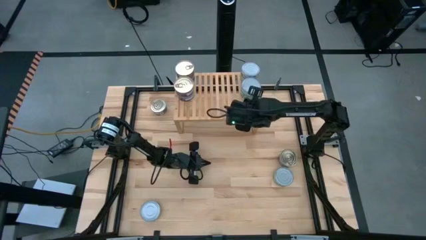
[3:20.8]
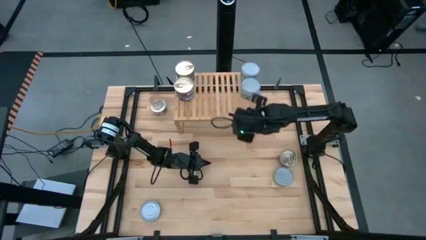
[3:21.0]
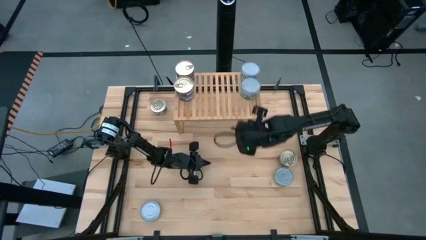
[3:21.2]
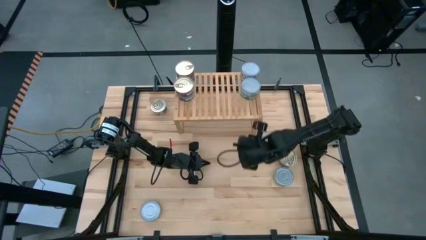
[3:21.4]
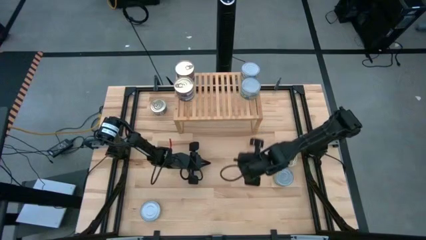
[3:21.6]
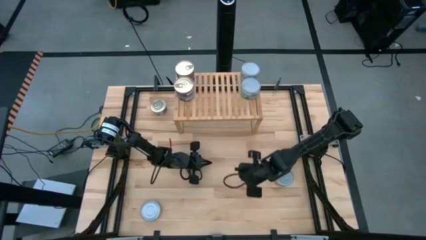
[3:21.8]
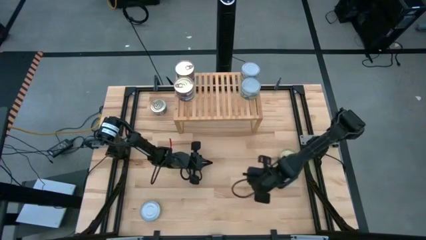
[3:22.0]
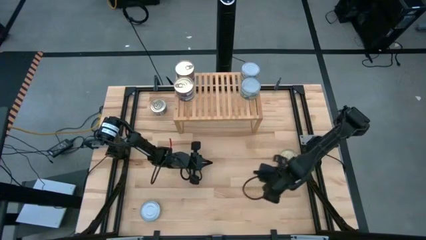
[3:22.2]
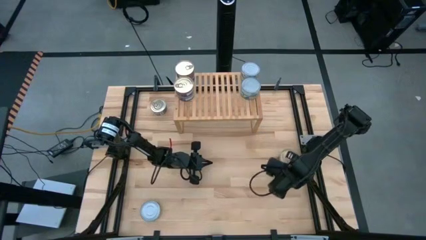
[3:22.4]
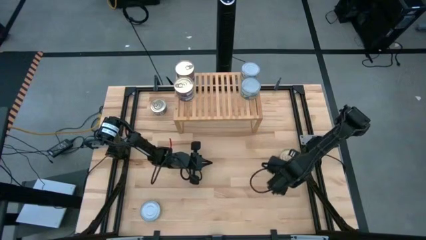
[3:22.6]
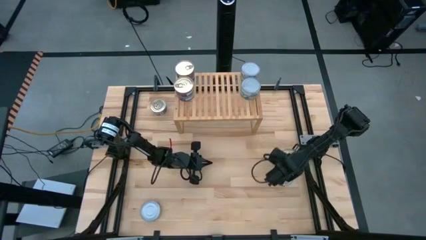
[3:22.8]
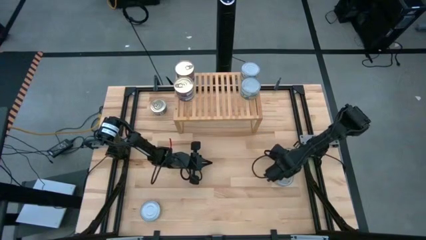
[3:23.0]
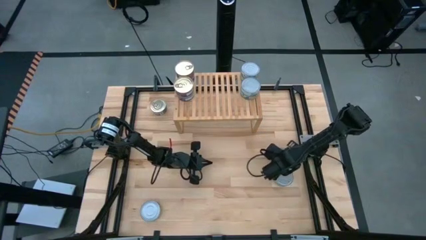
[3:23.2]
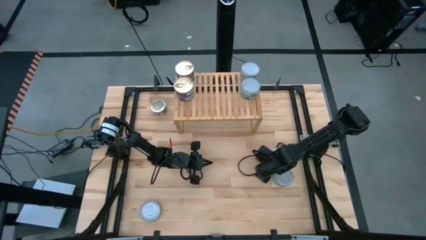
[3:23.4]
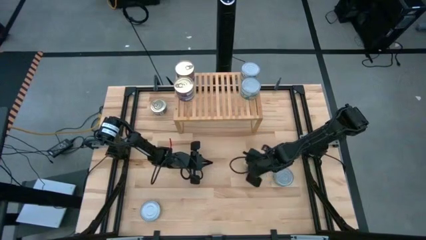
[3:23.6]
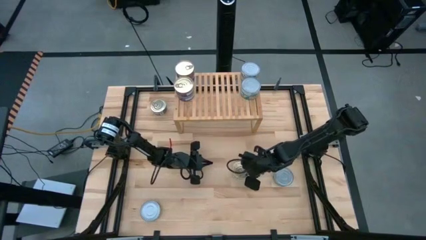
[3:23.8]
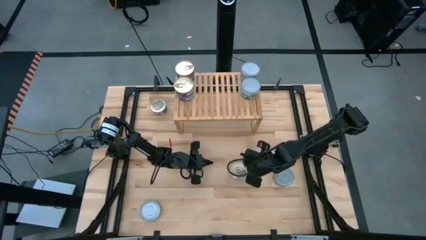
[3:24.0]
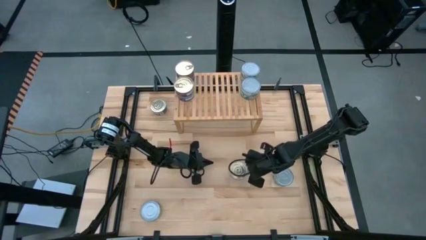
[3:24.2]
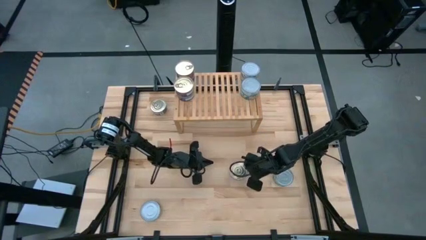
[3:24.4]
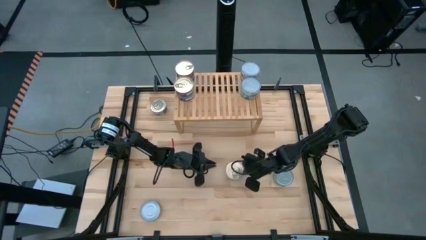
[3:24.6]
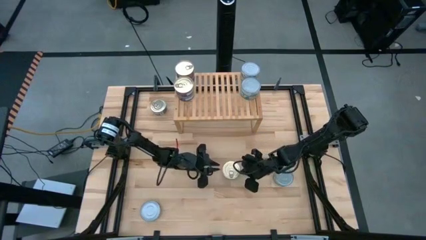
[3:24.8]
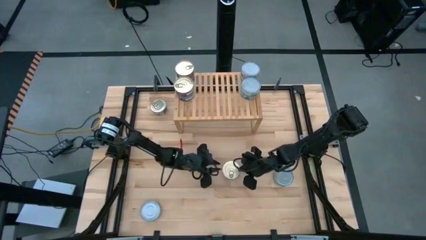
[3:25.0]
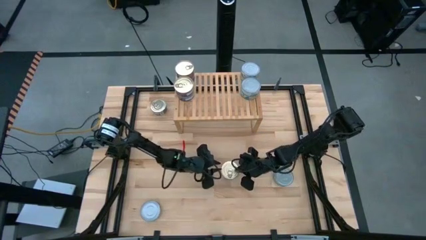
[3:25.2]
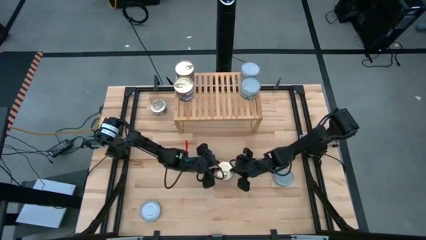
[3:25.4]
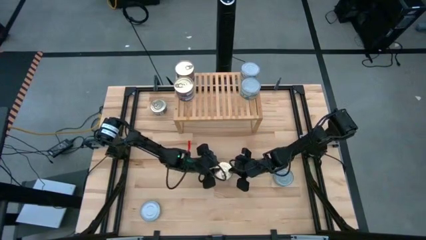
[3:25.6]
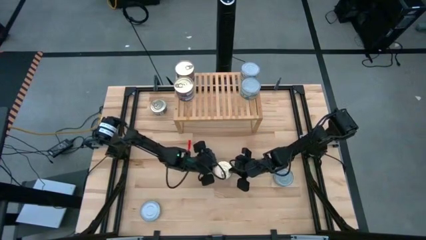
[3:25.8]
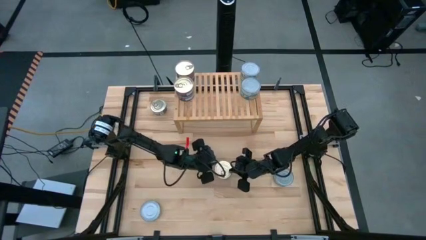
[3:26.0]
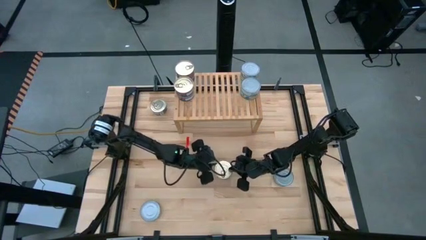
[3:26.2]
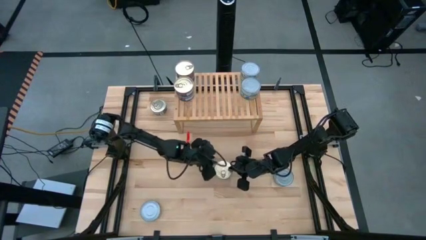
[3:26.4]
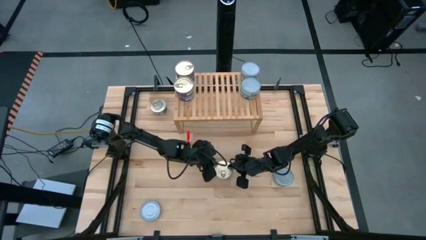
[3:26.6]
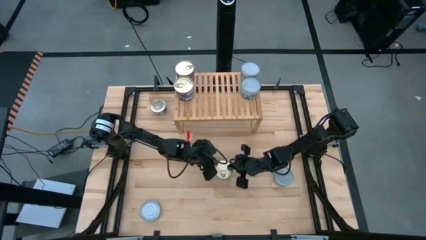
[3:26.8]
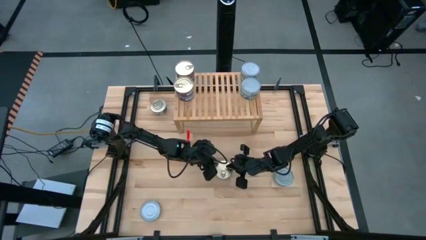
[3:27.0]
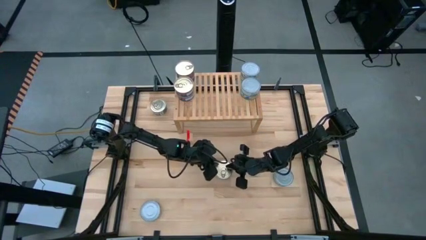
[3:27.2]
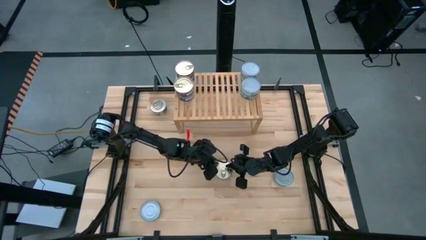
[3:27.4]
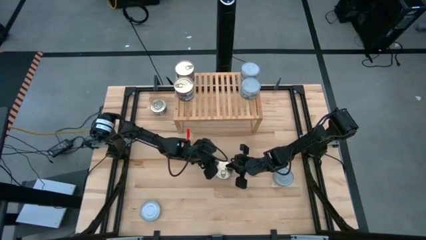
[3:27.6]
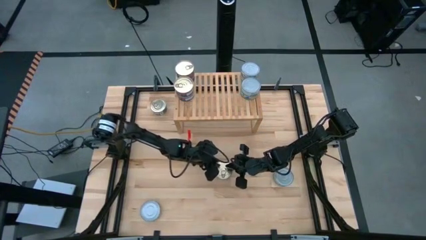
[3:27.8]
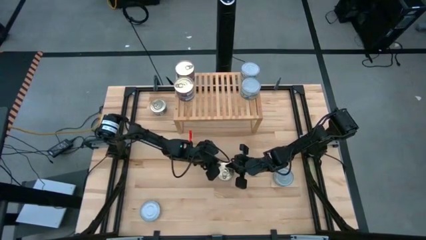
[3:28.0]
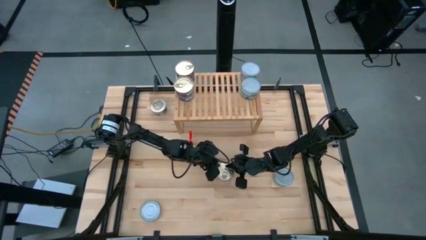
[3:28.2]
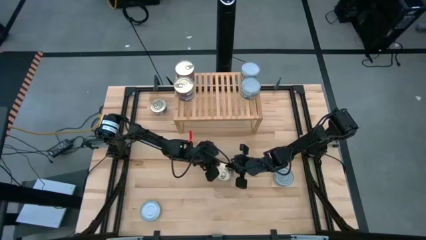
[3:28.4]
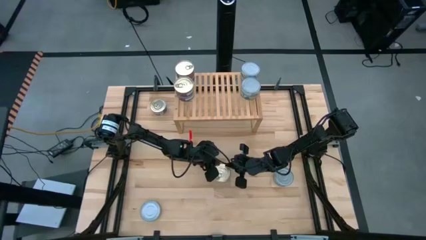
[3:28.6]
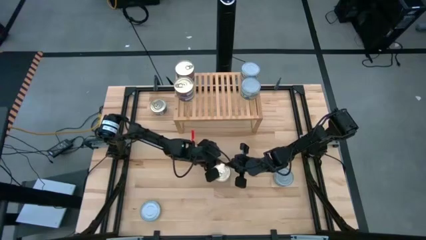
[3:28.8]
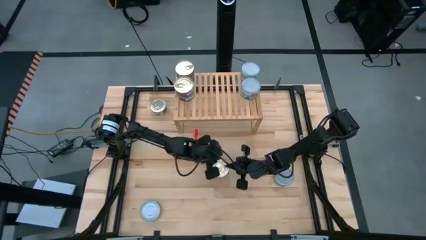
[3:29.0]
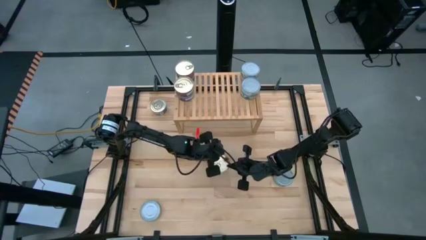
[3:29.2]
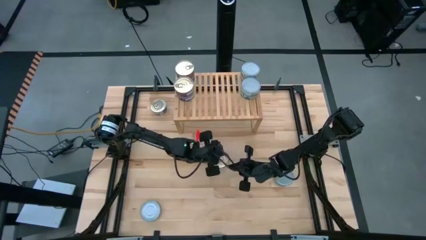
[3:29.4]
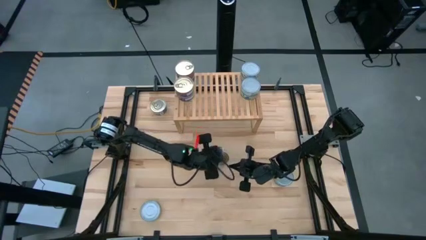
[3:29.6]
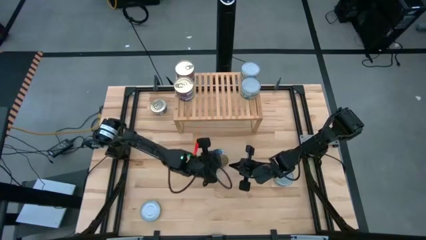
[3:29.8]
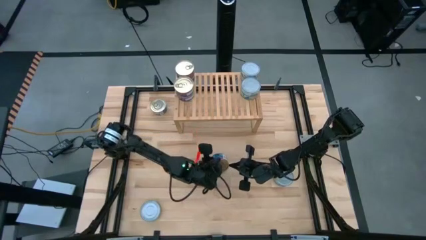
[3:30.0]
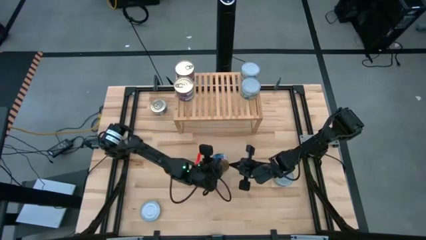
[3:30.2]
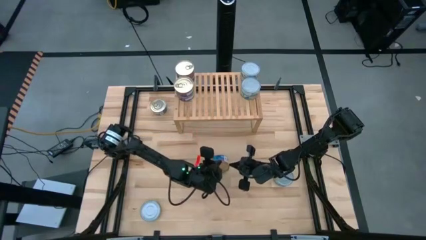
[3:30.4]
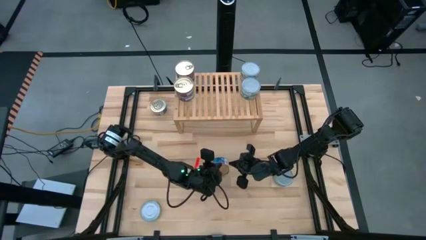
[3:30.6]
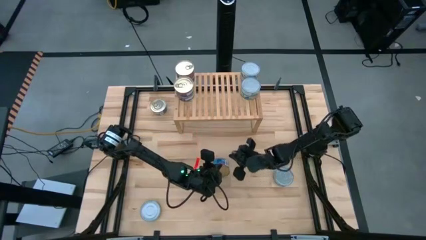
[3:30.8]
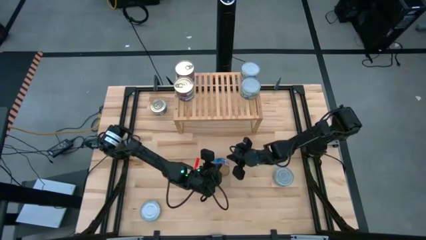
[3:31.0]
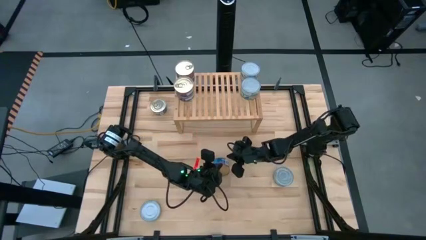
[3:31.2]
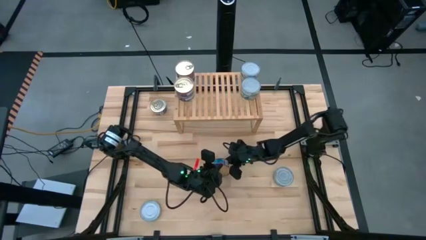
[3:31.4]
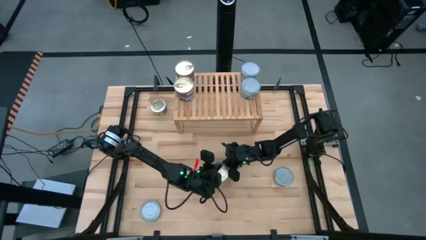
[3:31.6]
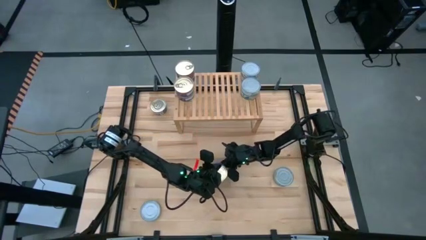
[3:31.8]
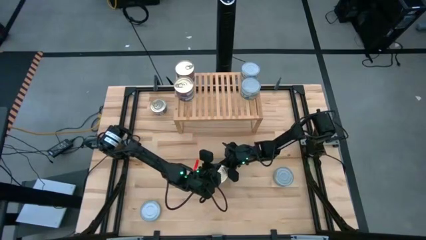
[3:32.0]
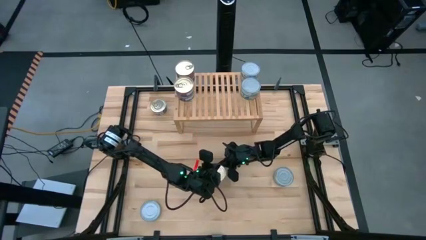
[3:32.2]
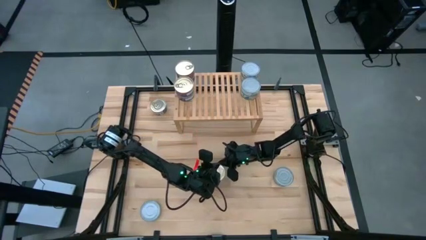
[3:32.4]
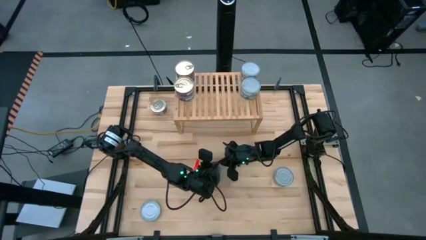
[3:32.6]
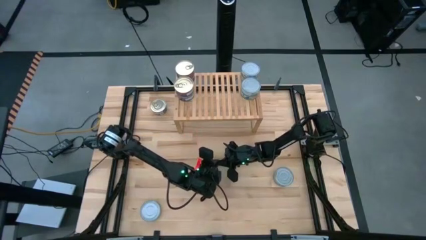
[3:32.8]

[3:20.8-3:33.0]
Task: Stack canned seafood by type on shelf
Put the blue-pink tuna can on the shelf

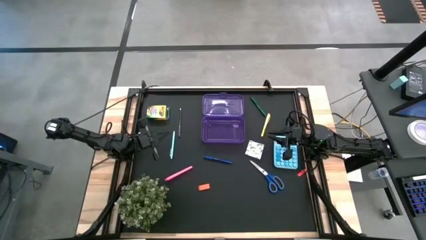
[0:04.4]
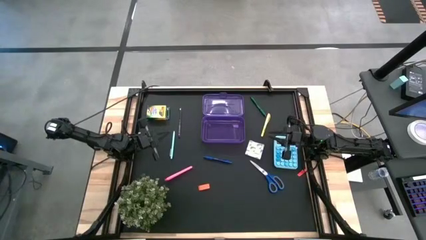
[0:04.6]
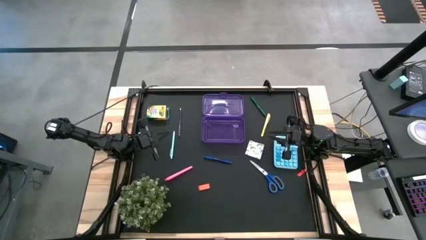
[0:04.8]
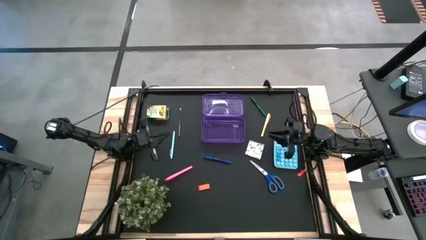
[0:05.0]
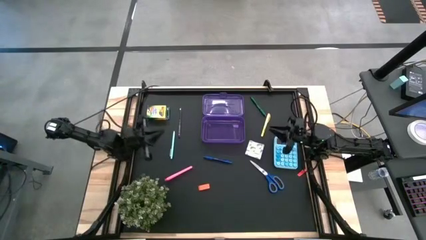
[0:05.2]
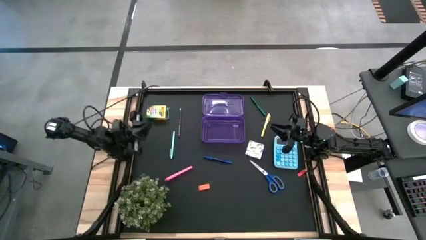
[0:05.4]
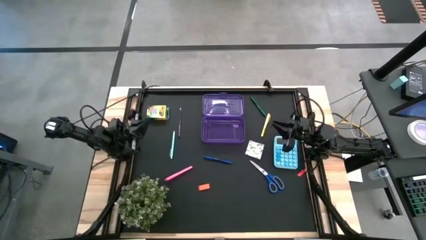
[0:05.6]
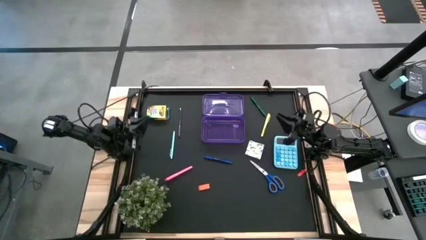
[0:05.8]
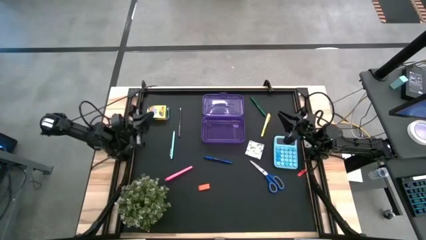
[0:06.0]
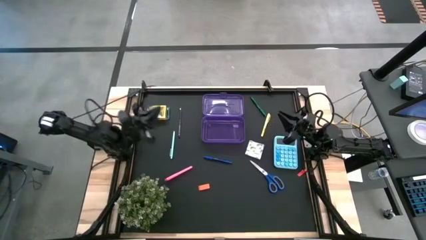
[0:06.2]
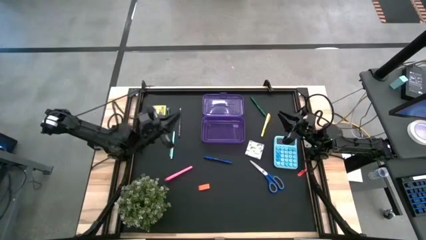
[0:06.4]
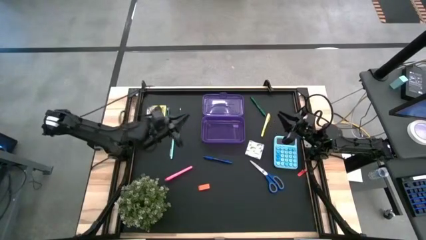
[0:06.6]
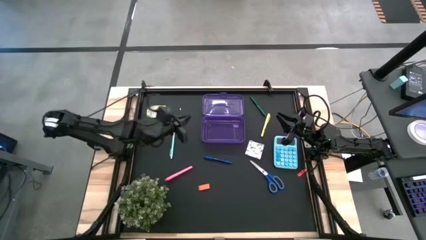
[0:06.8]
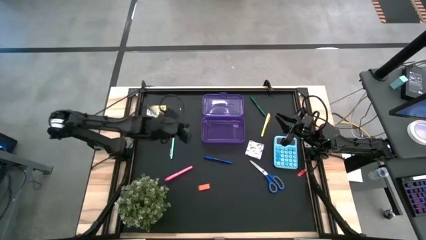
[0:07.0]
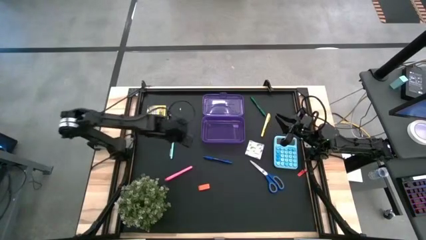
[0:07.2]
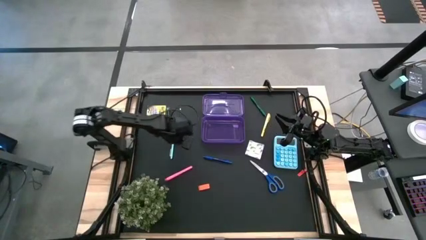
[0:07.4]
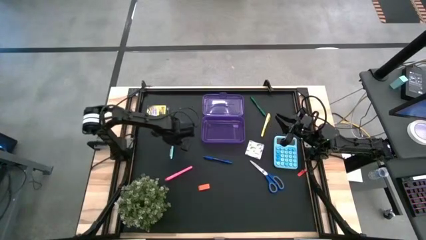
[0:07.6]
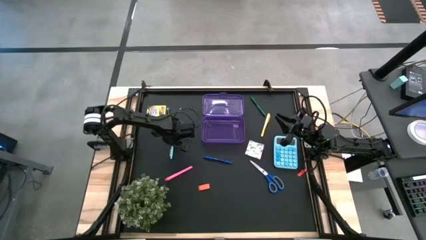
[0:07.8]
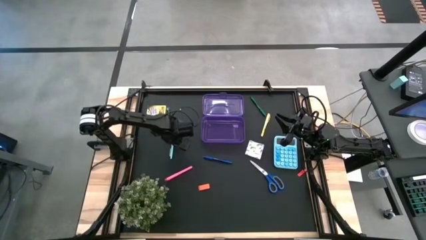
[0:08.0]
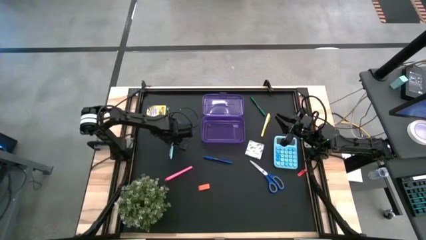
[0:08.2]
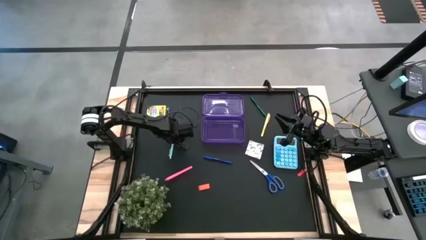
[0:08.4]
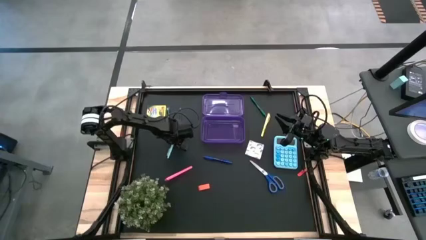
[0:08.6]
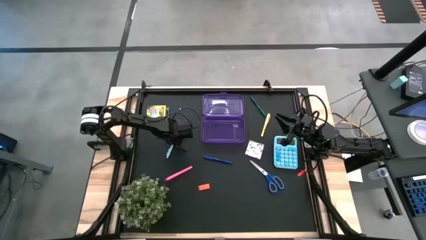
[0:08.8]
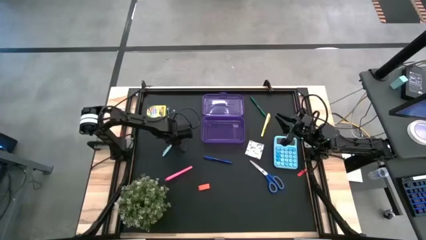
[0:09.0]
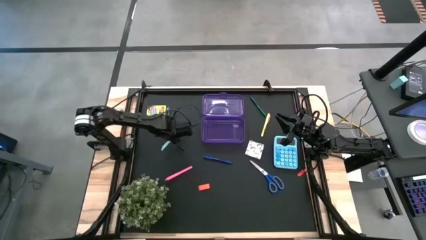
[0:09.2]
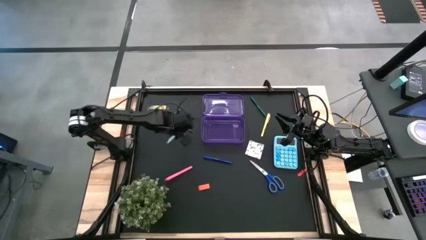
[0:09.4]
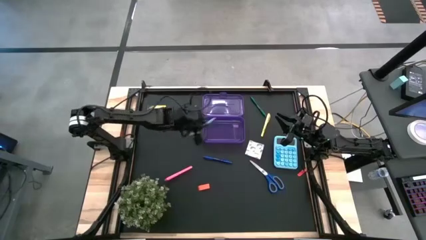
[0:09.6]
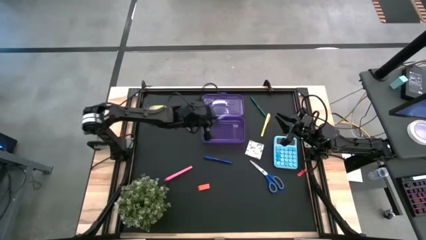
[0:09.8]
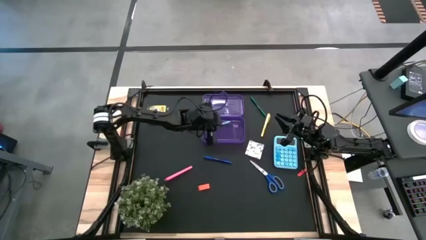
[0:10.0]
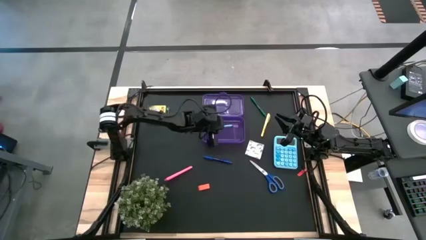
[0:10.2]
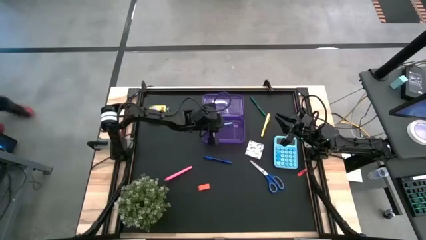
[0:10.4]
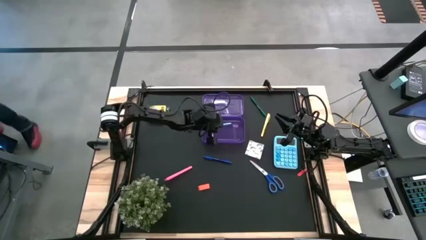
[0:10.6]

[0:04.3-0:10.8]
Task: Pack school essentials
Put the light blue pen into the purple box
